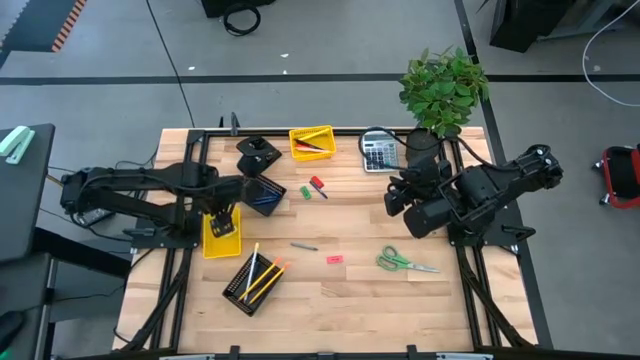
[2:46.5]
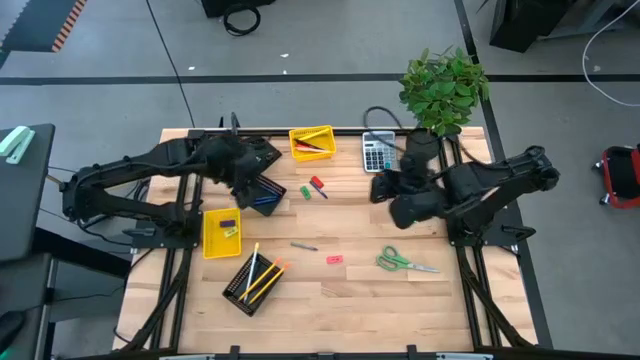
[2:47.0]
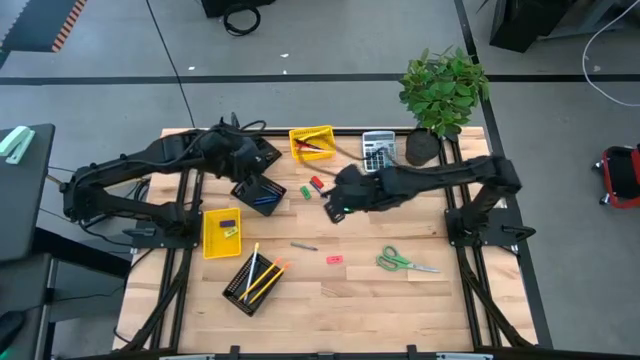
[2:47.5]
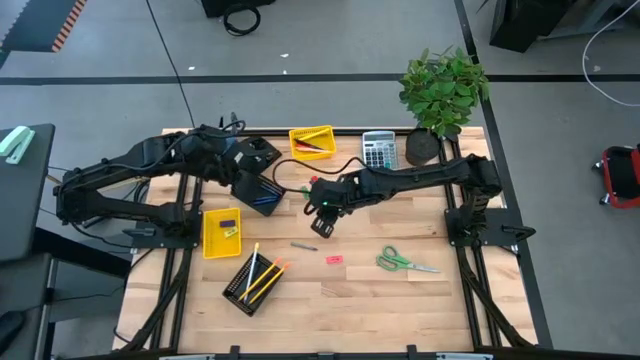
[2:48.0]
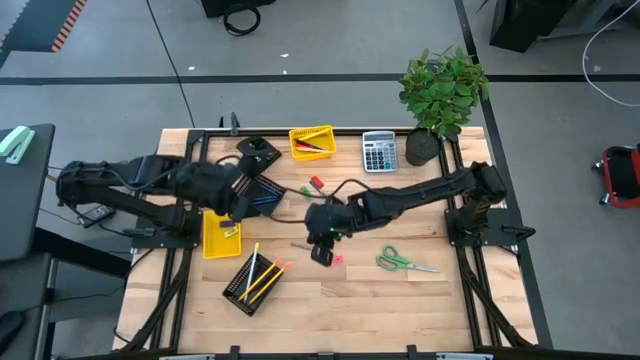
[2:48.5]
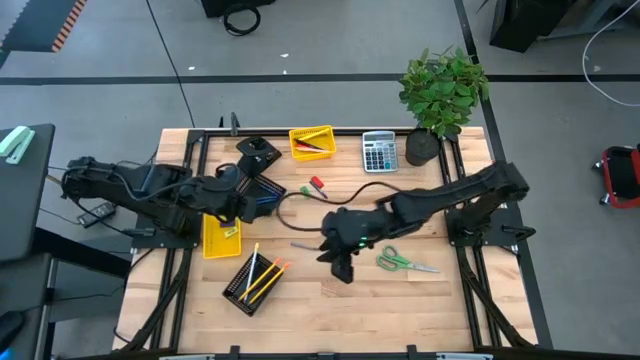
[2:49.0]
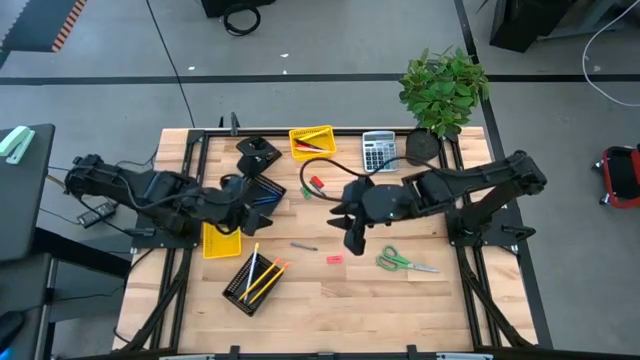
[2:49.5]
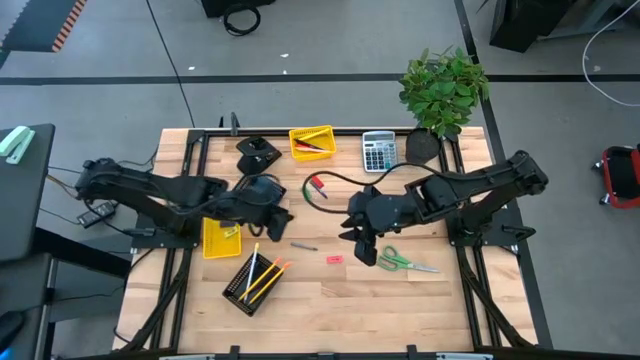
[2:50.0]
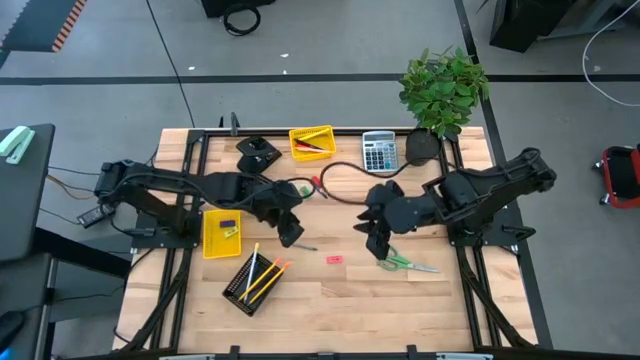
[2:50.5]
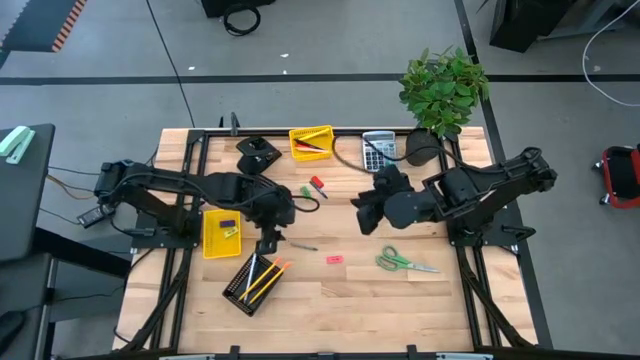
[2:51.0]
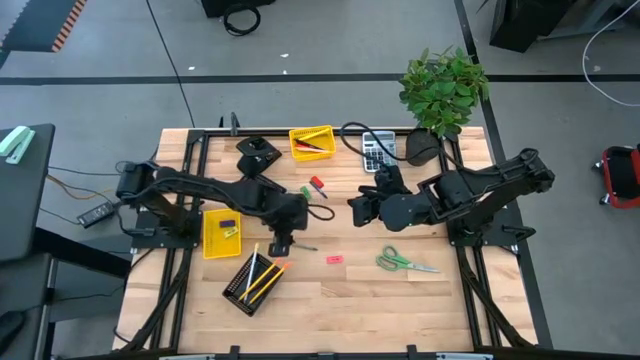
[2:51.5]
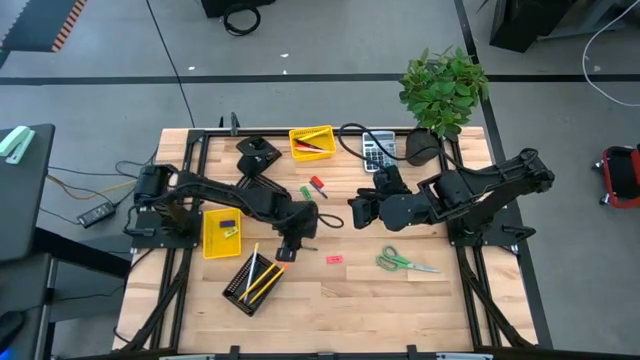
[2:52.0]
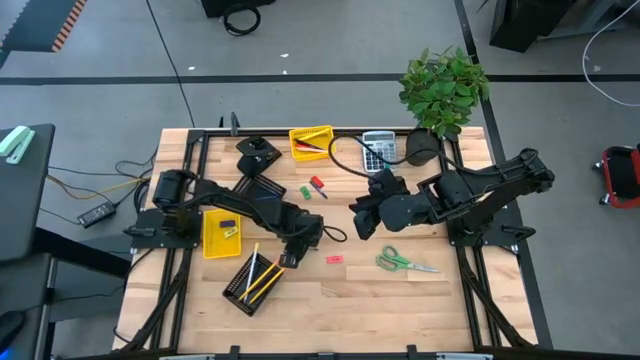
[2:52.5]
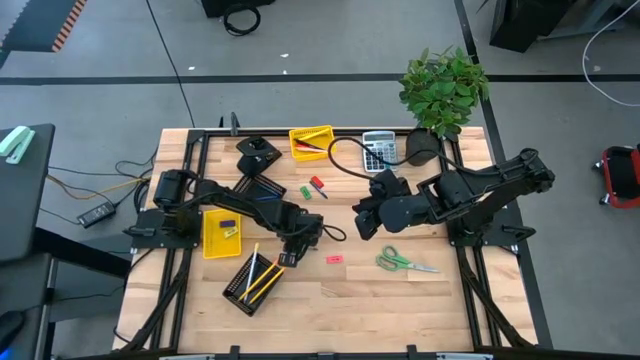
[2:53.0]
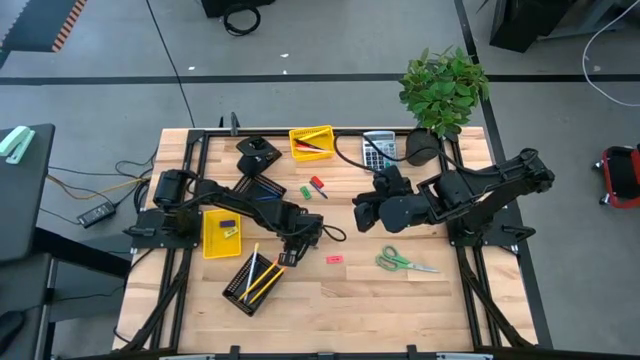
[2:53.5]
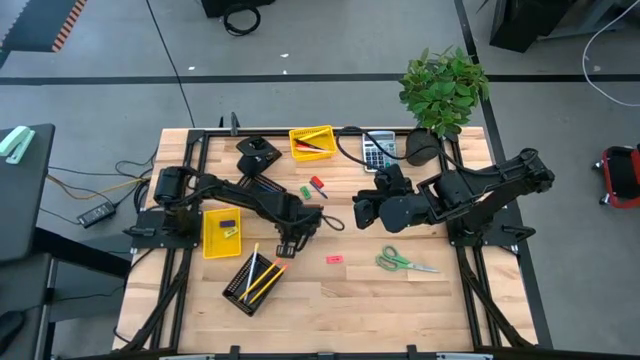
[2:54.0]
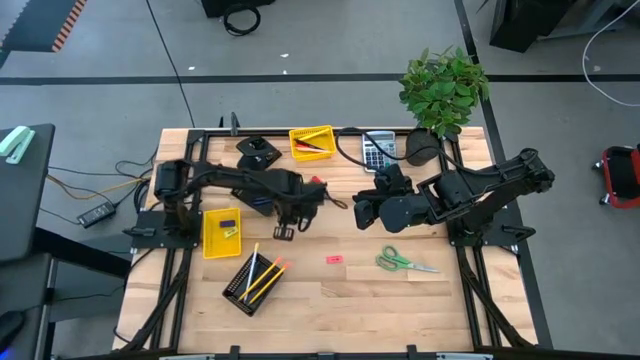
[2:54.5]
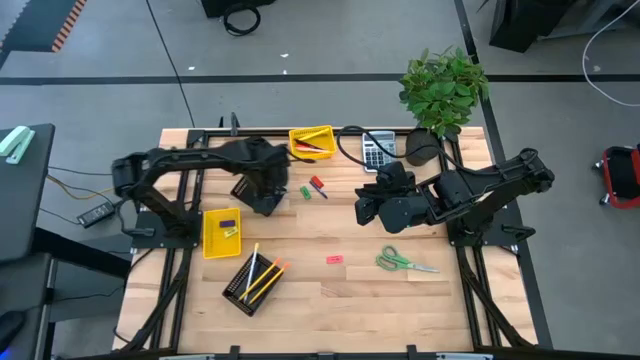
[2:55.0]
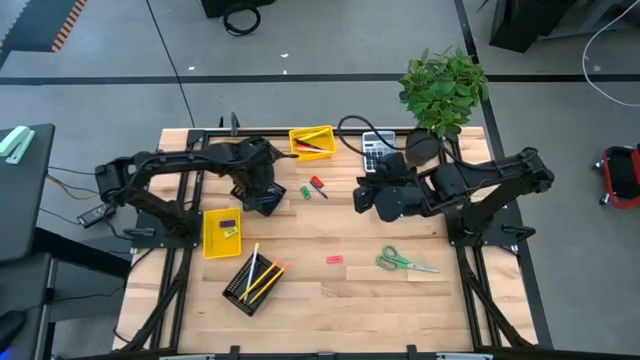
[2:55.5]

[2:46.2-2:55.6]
Task: Sort crayons/erasers/pens/pencils in bins
Put the gray crayon into the top black basket

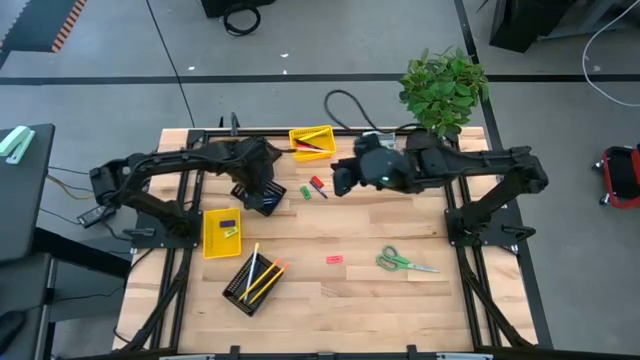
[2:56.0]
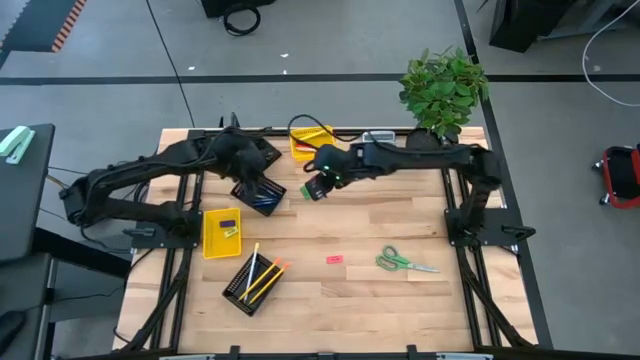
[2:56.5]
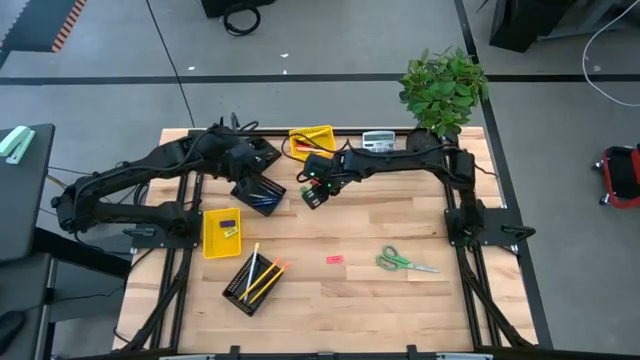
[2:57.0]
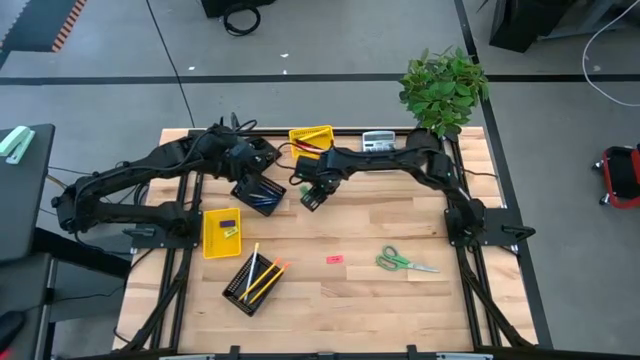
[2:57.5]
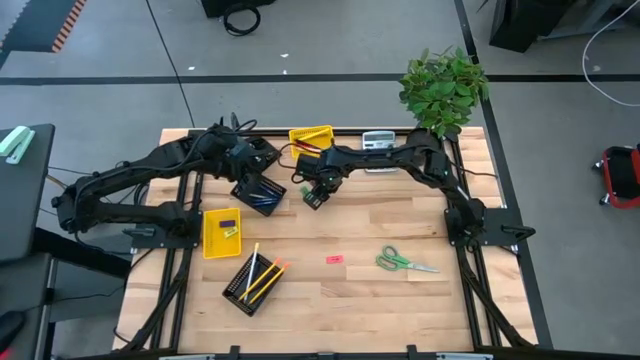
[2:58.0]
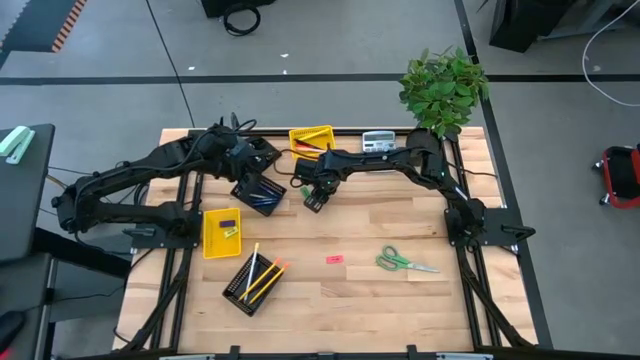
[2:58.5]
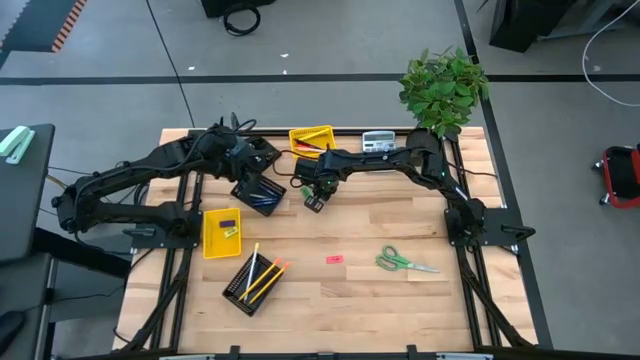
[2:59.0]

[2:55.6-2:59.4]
Put the blue crayon into the top black basket

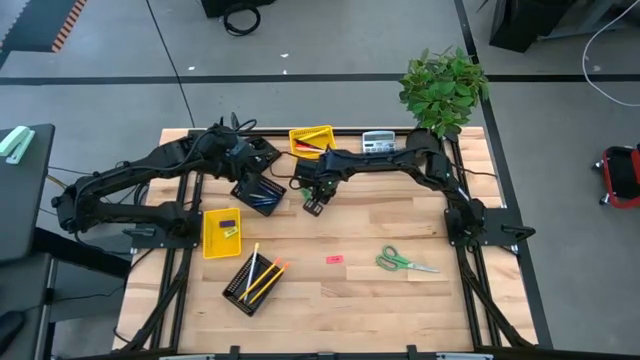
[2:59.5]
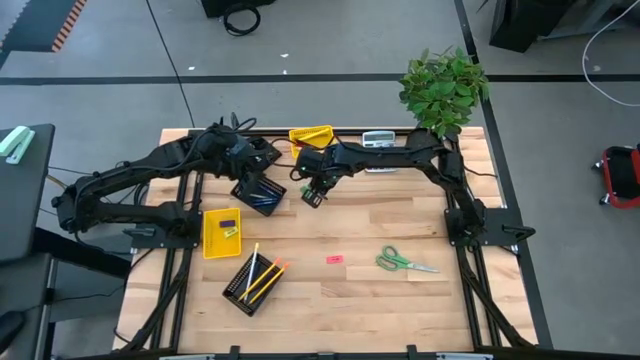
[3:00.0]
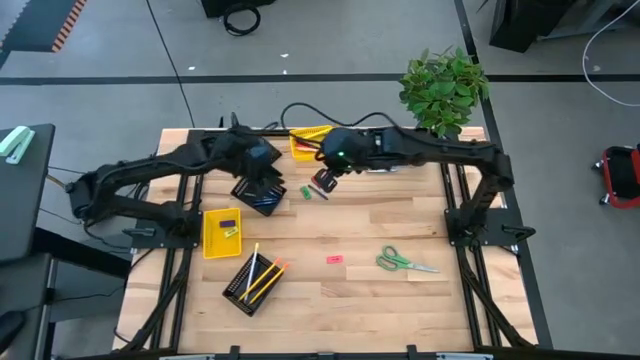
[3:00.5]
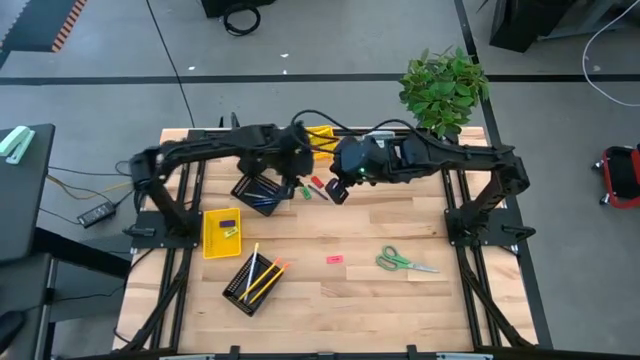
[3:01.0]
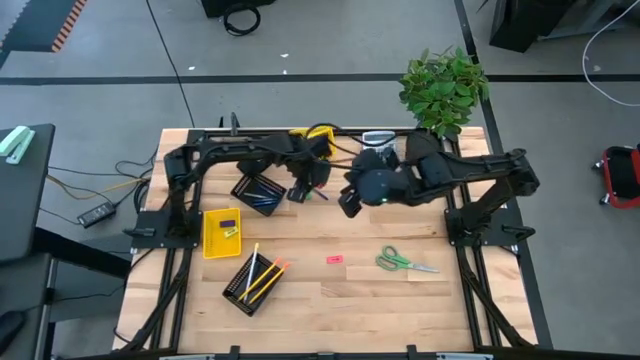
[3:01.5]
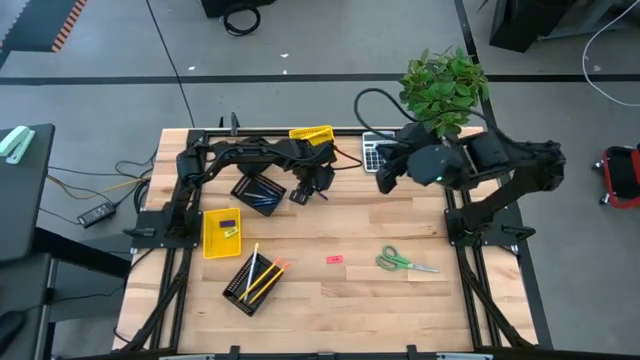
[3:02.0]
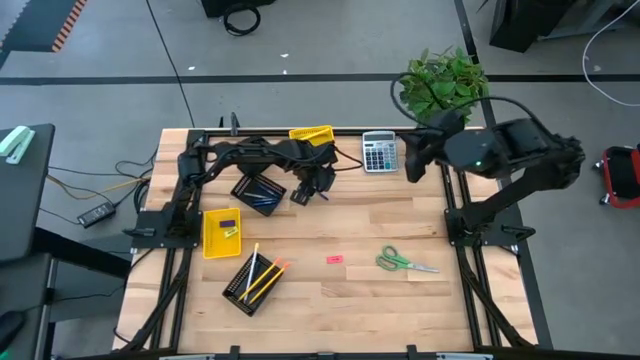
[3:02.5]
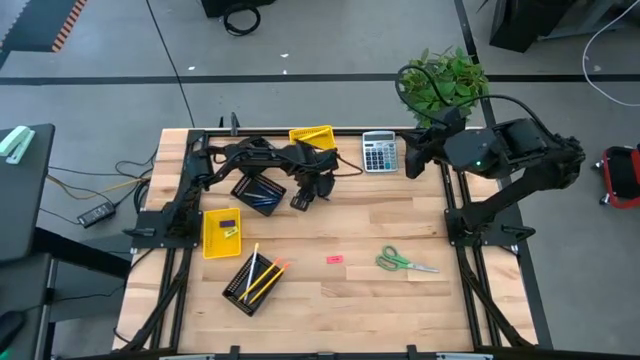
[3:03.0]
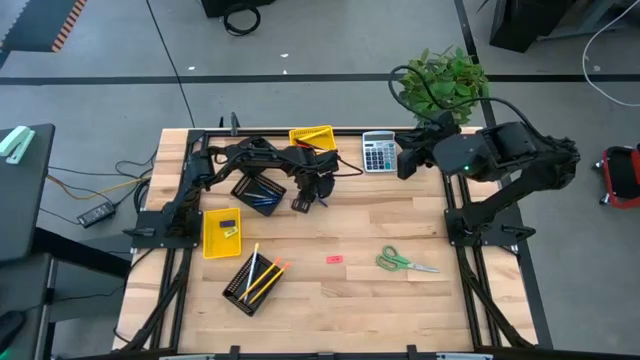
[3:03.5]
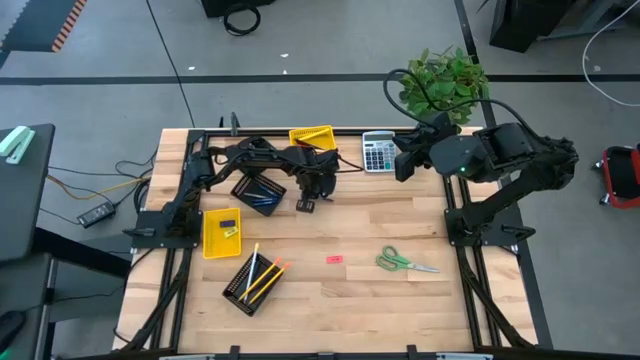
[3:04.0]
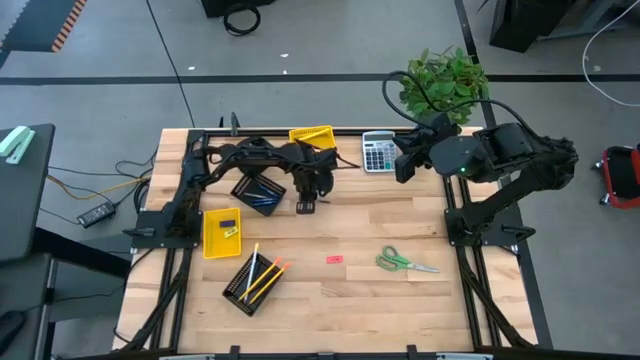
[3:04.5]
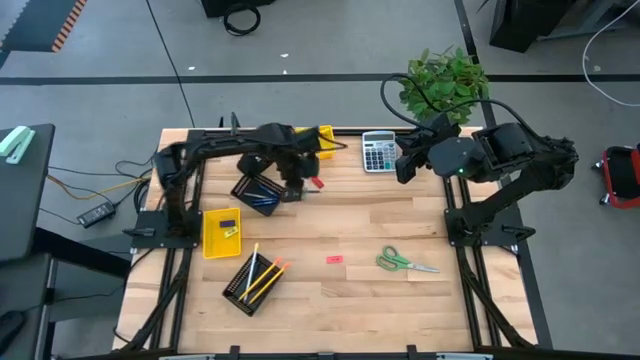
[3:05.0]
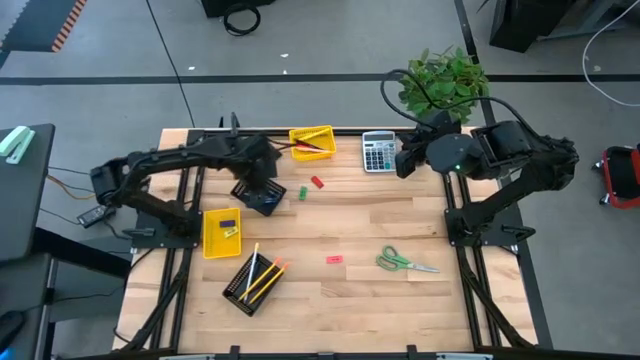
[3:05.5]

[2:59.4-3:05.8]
Put the blue crayon into the top black basket

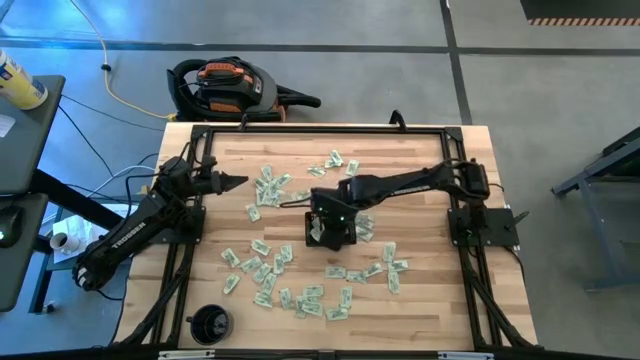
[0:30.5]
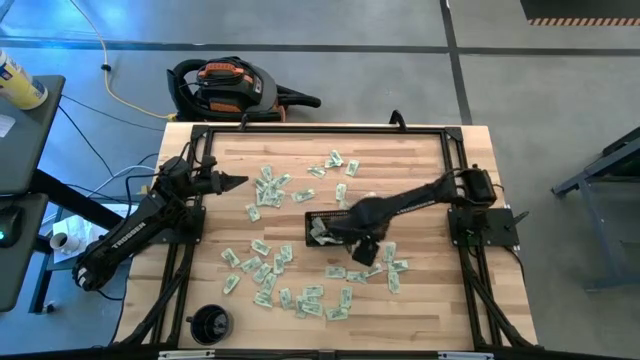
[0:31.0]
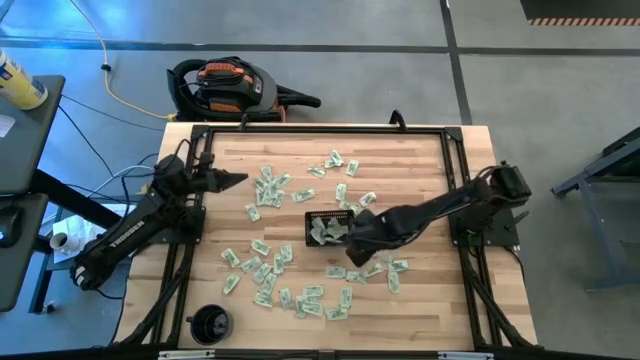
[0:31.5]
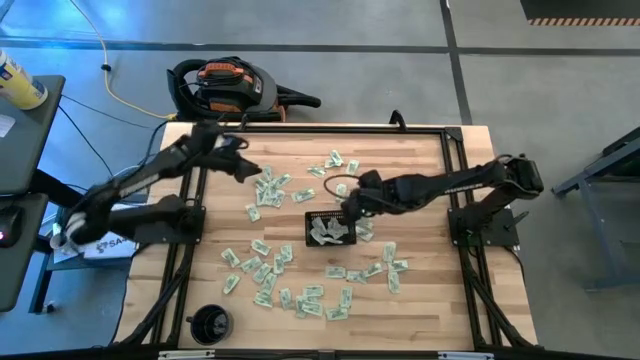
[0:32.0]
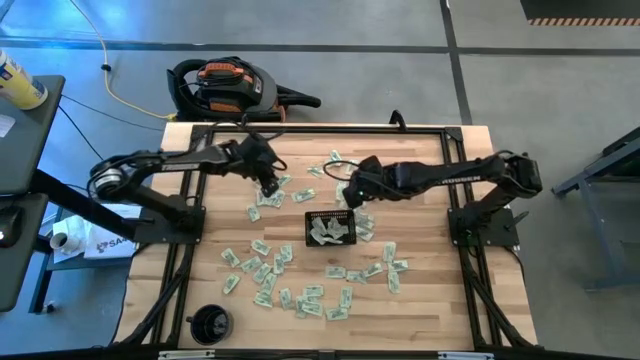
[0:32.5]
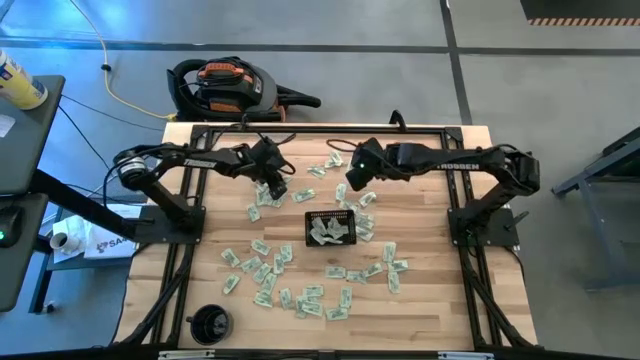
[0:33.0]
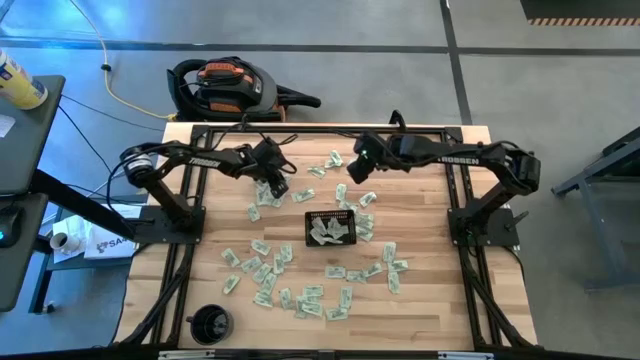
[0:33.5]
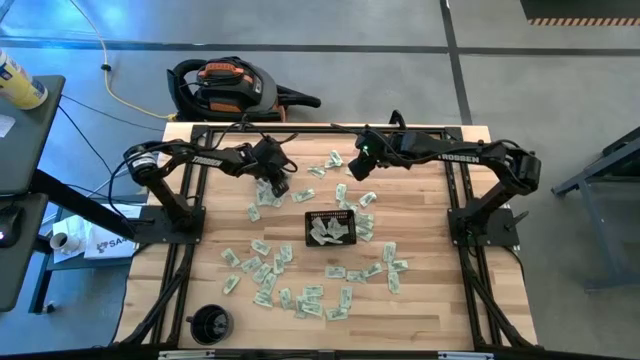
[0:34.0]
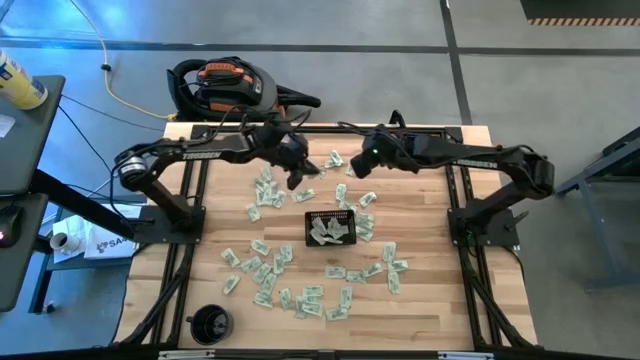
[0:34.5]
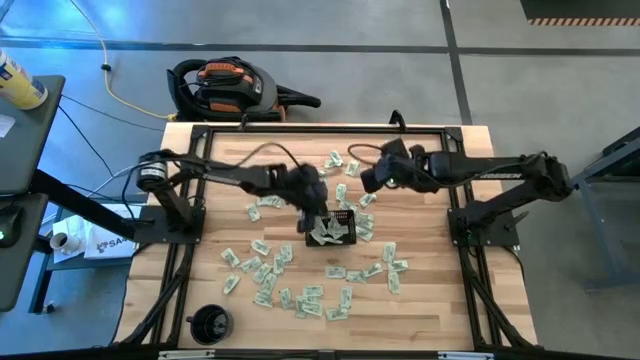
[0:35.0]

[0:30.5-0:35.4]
Task: Pick and place Stevia / Truvia into bins
Put the green stevia packet into the black basket
